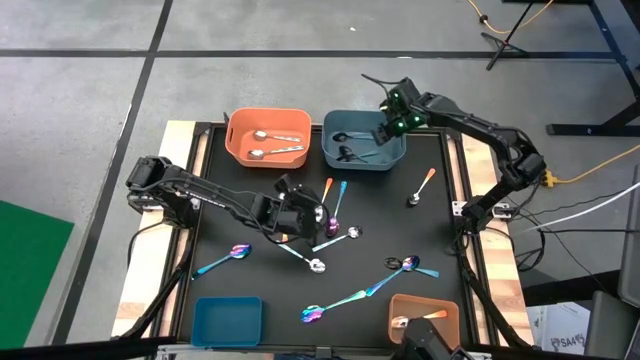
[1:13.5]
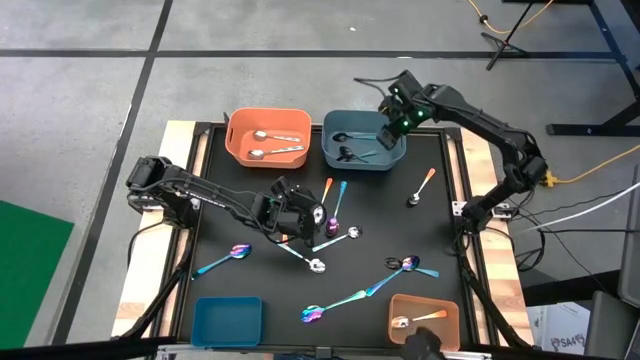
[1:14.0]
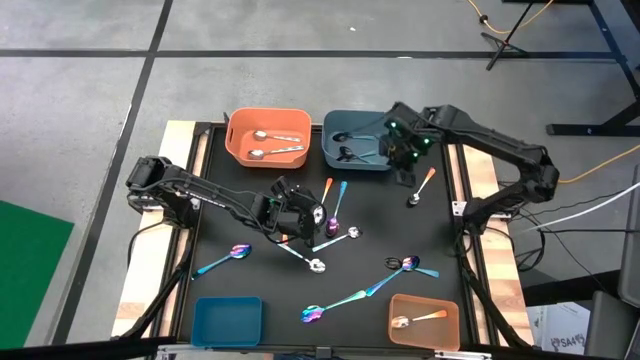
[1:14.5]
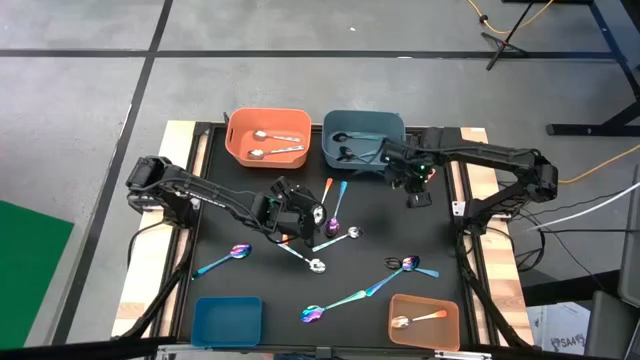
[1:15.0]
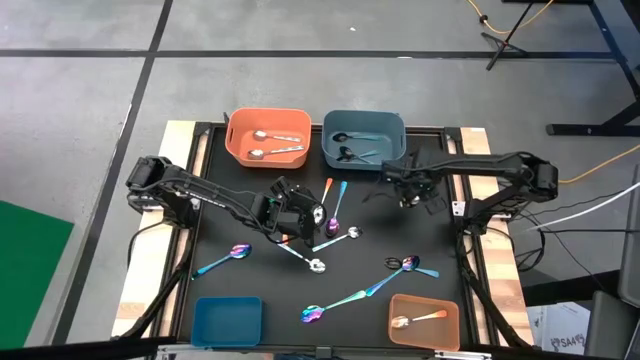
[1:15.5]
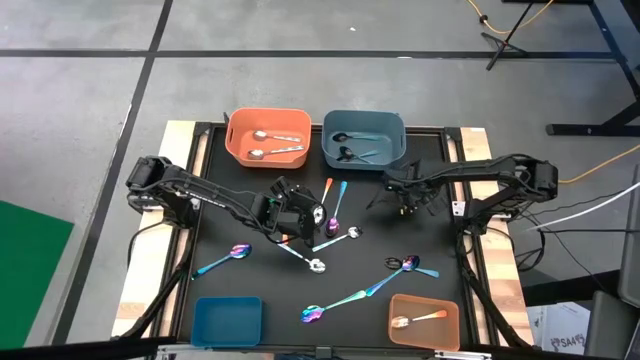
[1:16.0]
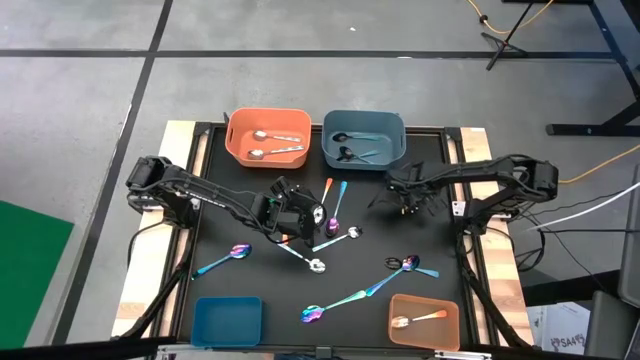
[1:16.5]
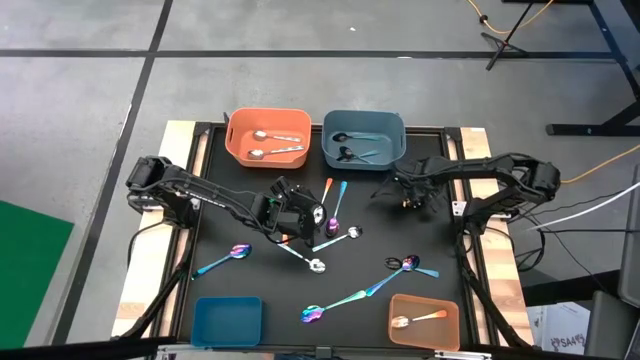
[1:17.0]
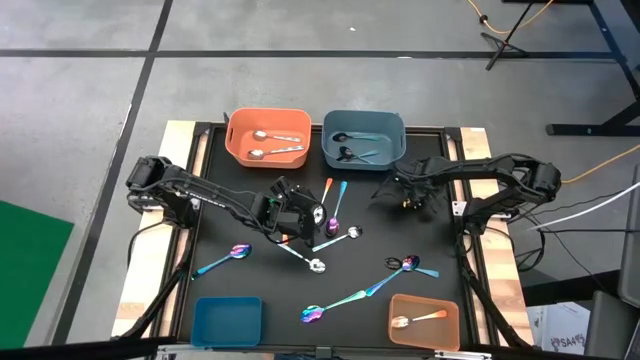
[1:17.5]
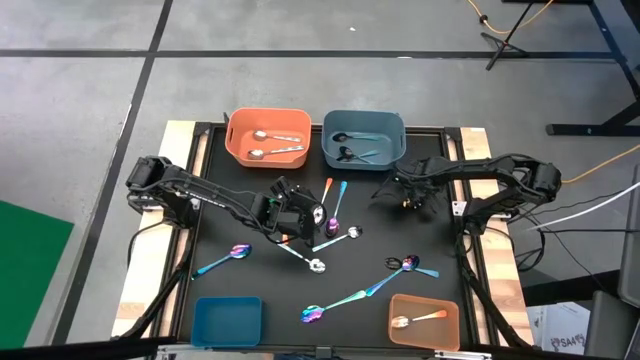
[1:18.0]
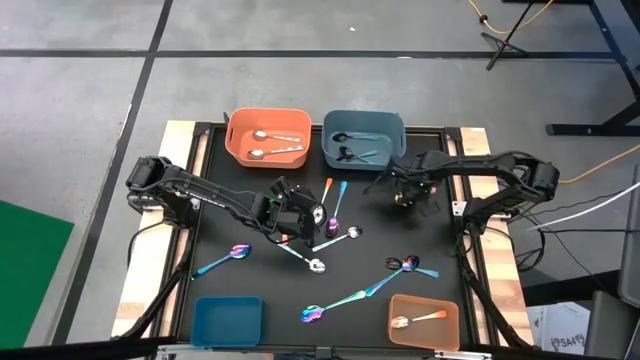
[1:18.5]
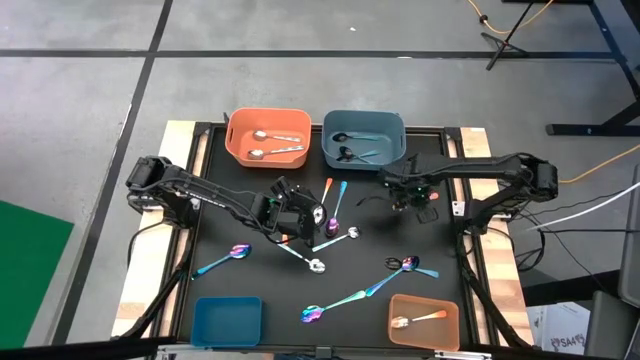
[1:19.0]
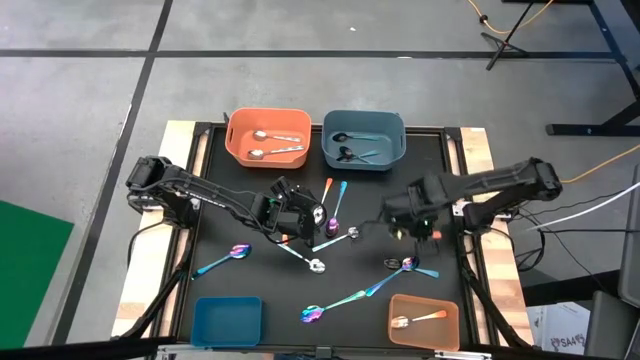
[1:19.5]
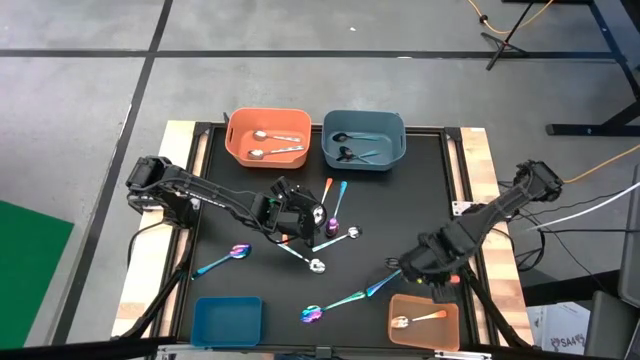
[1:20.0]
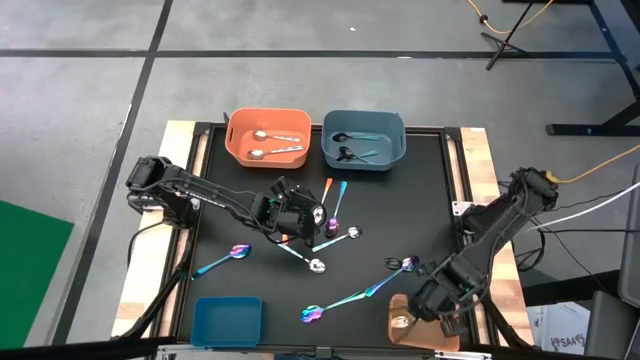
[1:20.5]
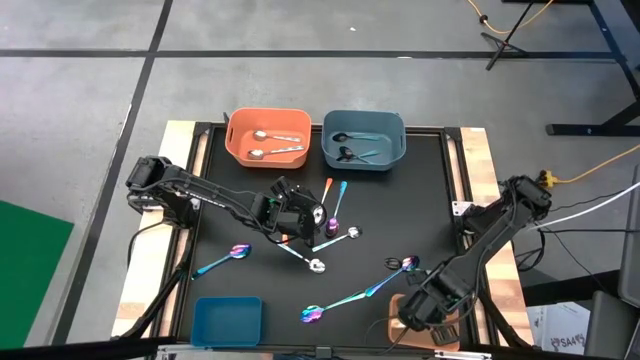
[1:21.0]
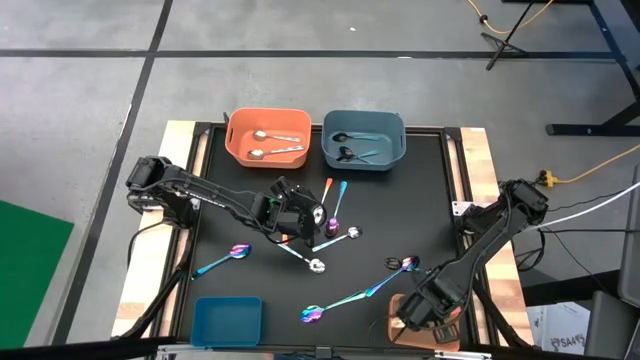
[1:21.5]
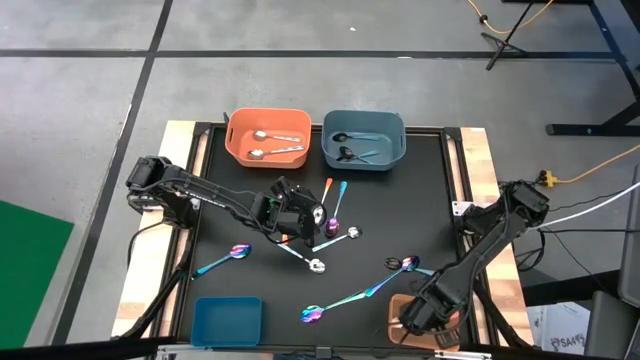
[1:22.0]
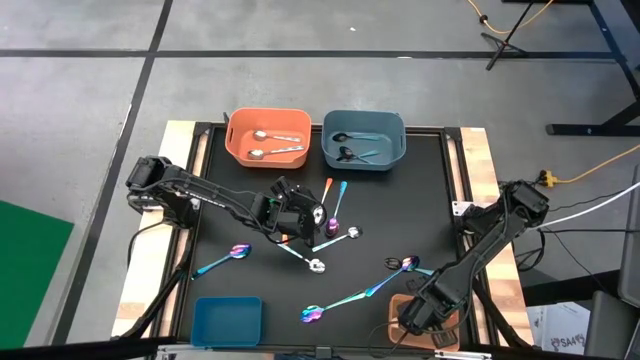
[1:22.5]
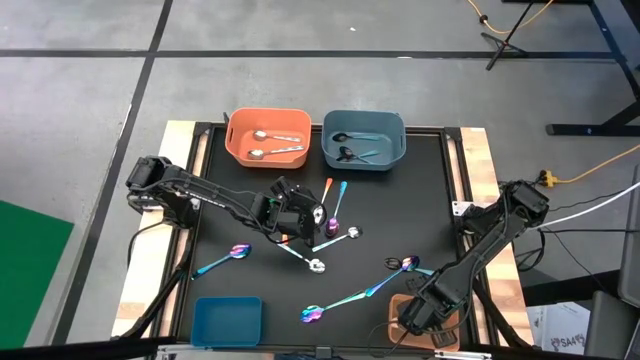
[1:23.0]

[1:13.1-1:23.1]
Task: Sort silverware by color (type)
Put the orange spoon into the bottom orange bin

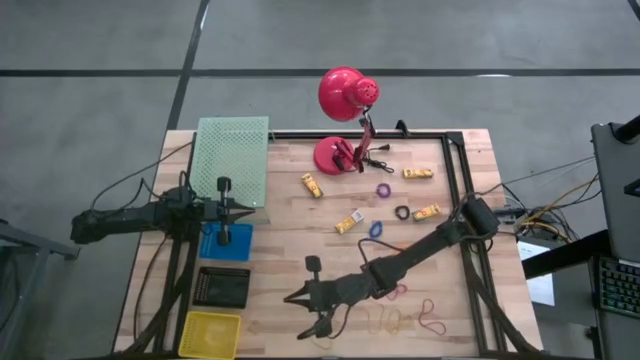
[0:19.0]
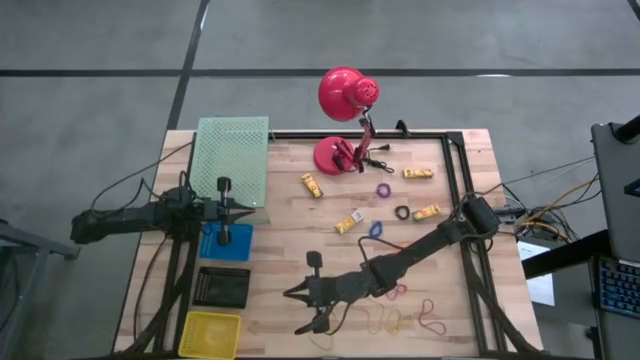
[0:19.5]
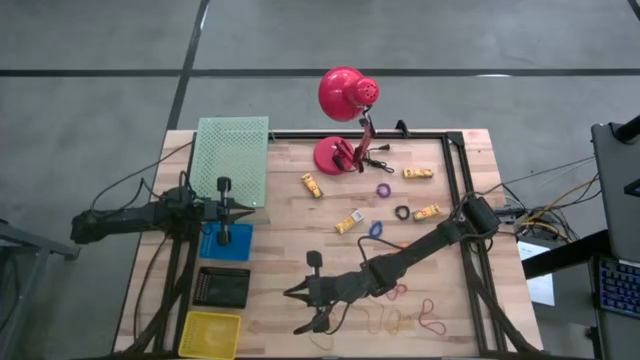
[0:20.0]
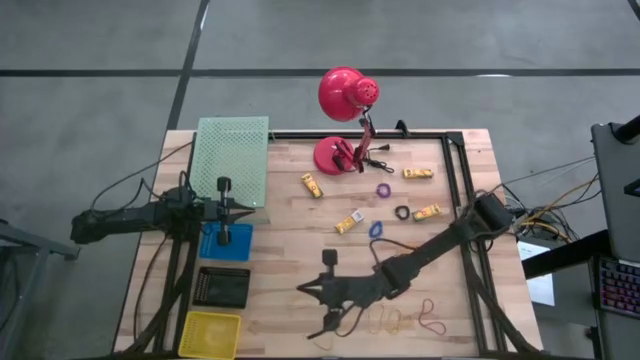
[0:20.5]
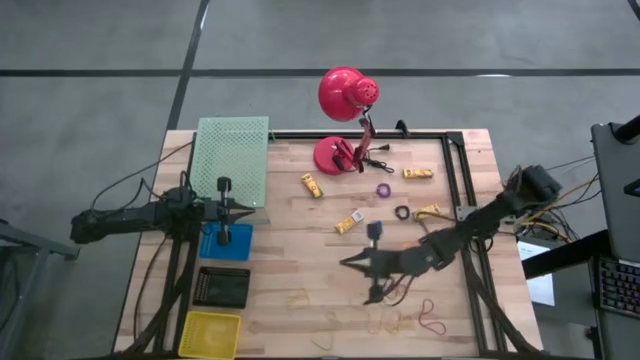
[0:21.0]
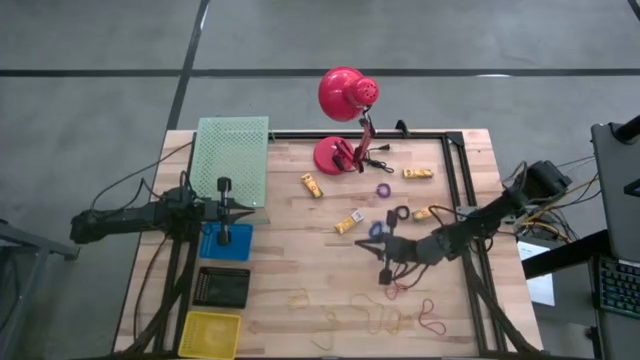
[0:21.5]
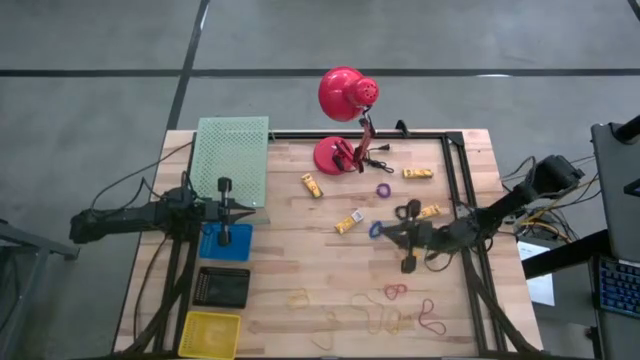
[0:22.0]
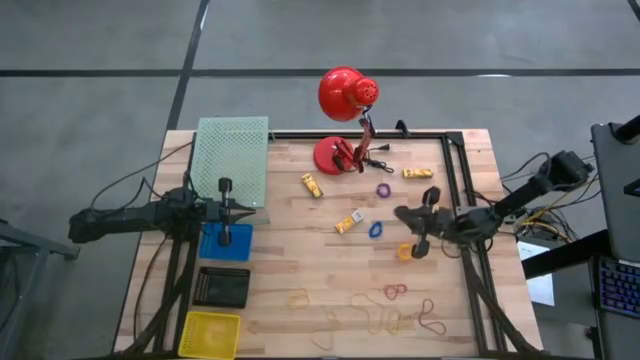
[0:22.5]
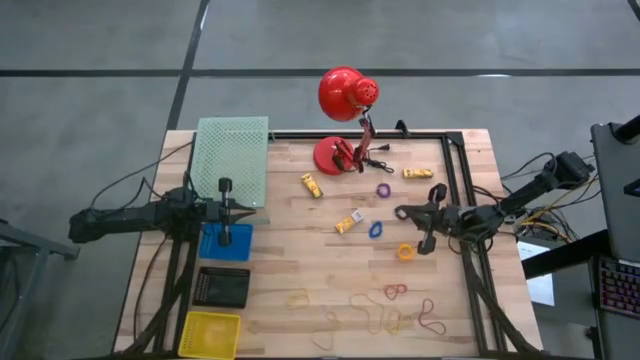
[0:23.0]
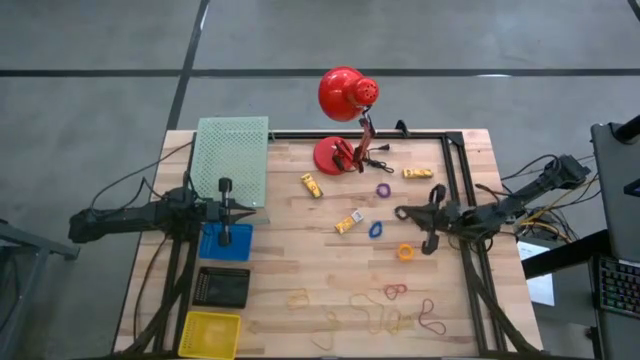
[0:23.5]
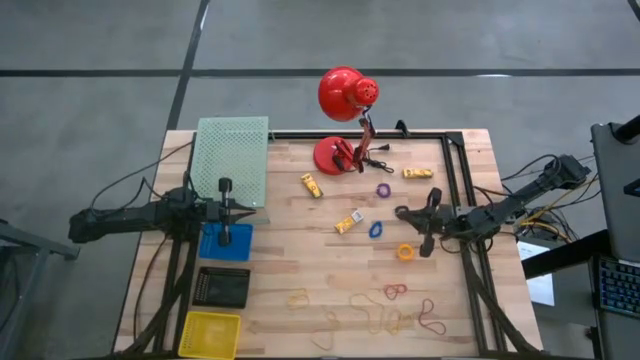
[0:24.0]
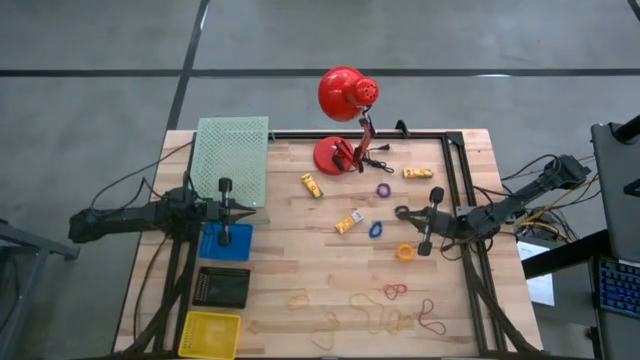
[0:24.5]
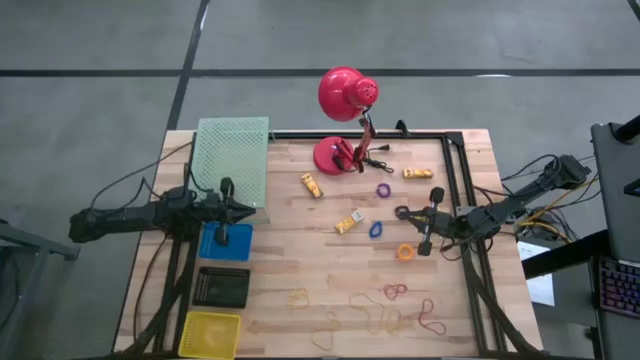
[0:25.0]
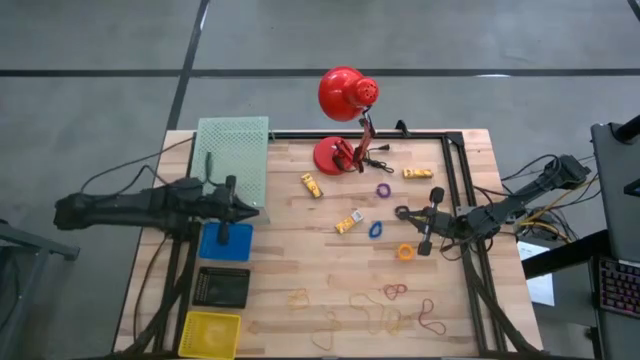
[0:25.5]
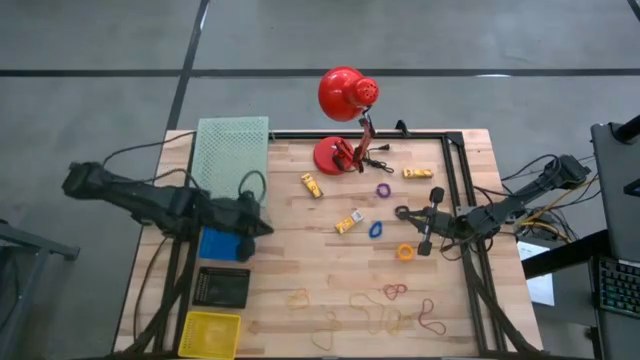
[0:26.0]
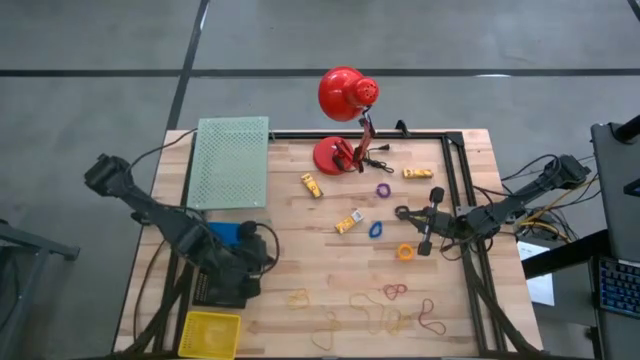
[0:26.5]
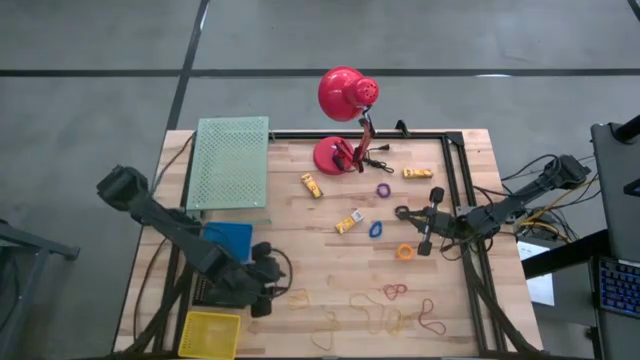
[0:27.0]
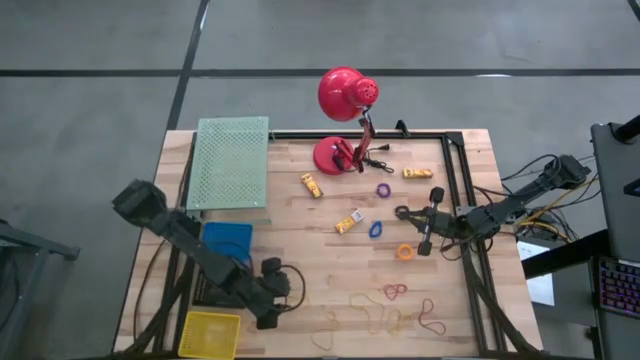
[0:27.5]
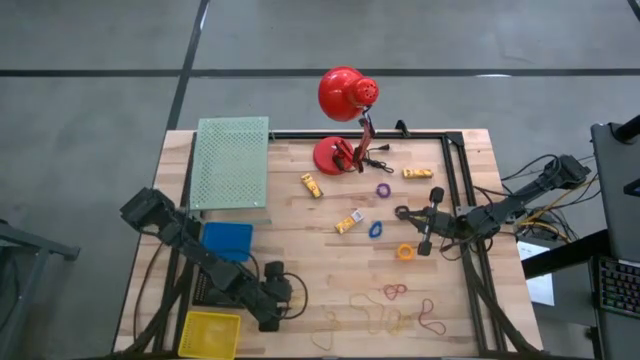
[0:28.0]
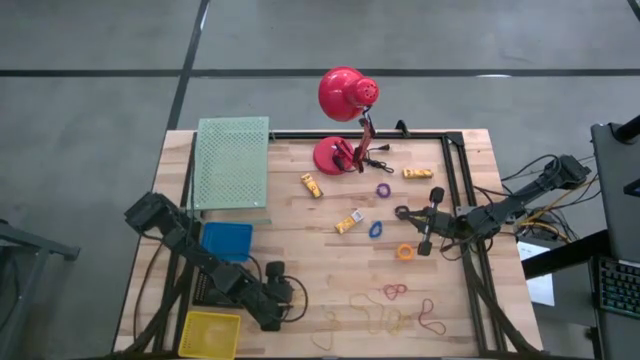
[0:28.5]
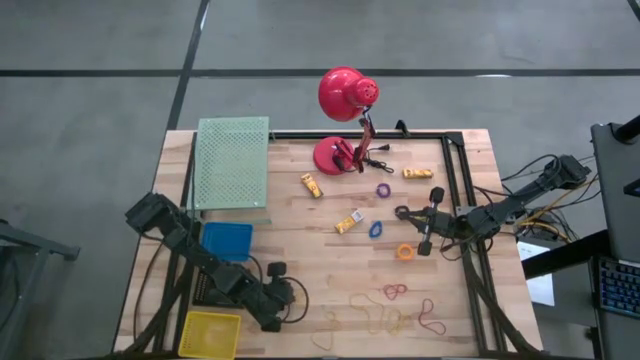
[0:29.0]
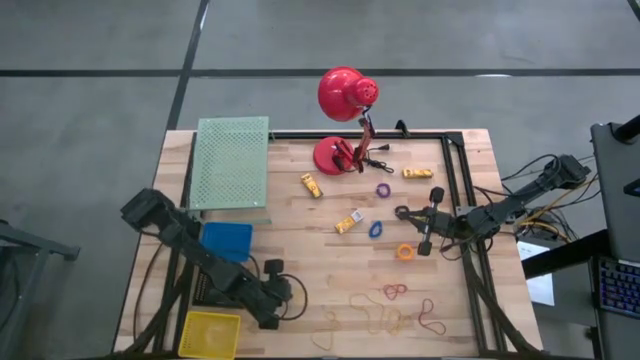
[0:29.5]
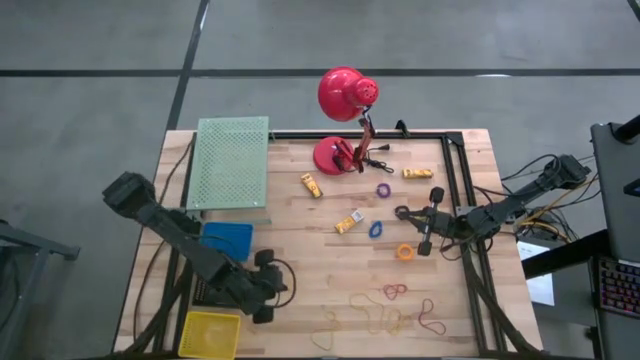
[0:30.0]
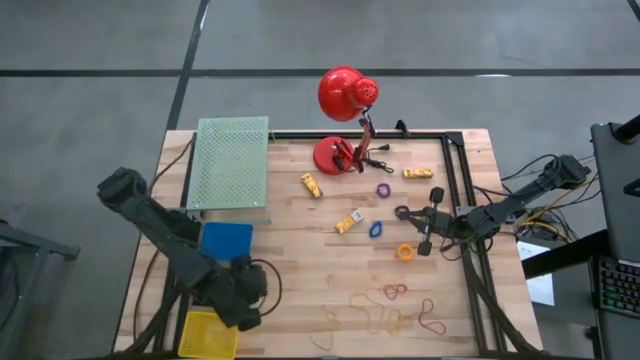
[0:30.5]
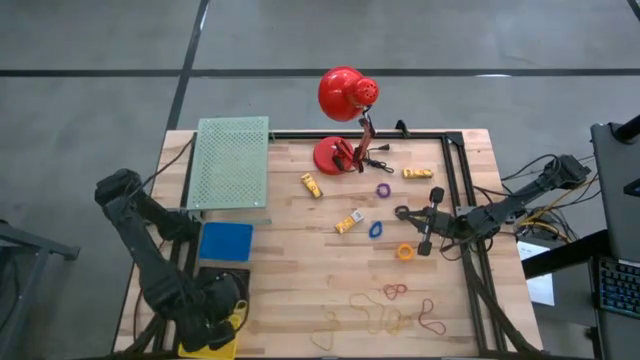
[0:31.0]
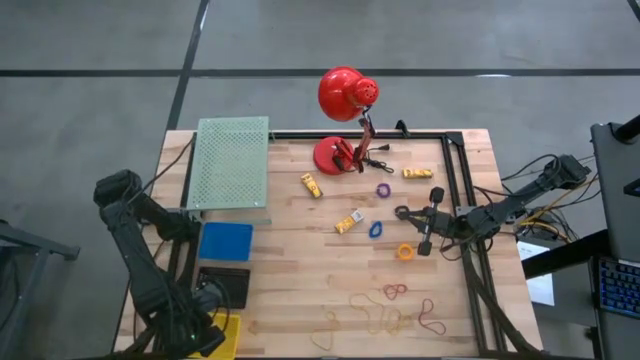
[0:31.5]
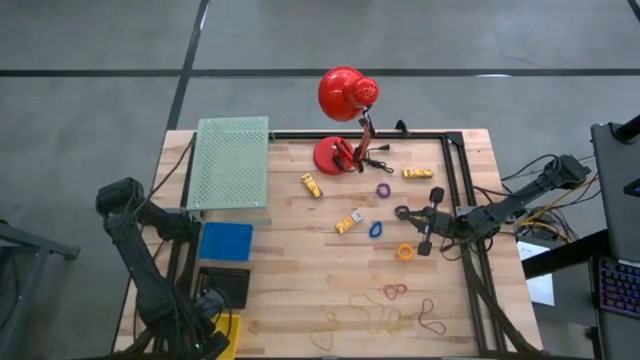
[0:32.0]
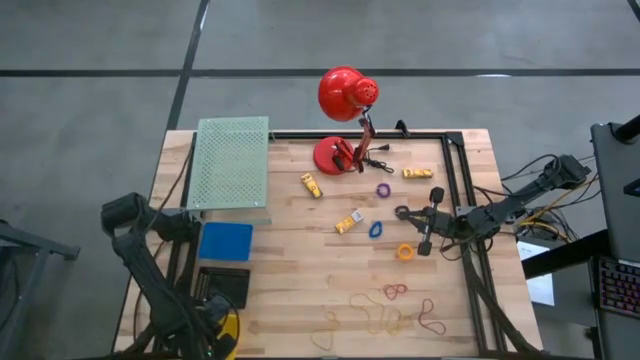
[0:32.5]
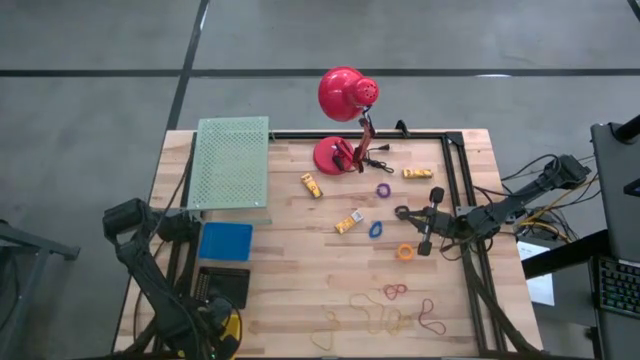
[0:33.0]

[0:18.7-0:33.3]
Task: Pick & Place Office Desk Supplies
Put the yellow rubber band into the yellow bin
